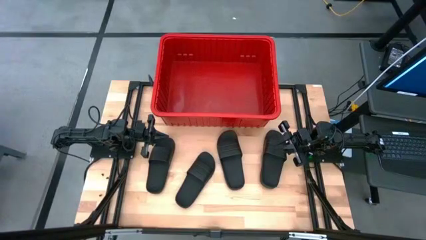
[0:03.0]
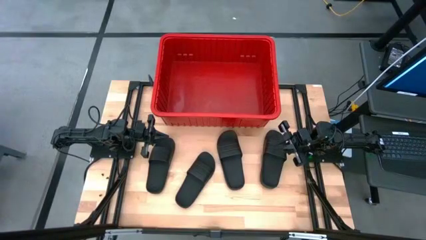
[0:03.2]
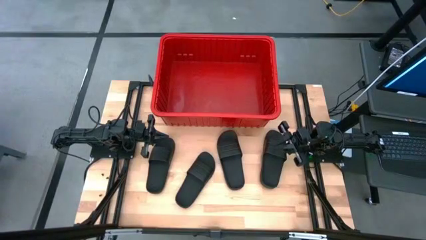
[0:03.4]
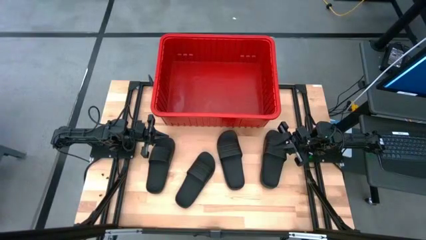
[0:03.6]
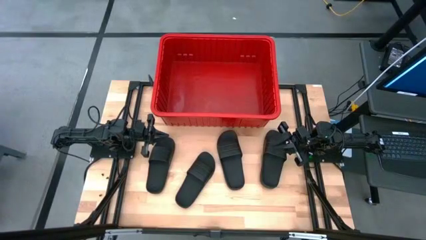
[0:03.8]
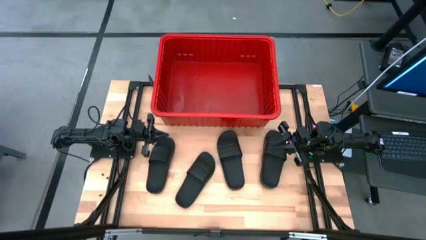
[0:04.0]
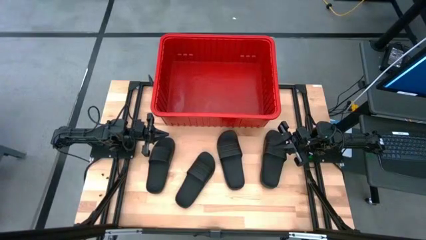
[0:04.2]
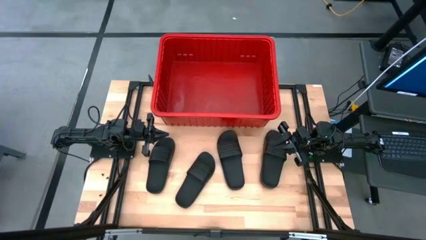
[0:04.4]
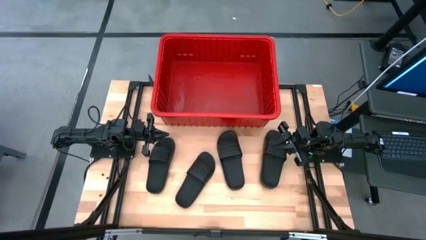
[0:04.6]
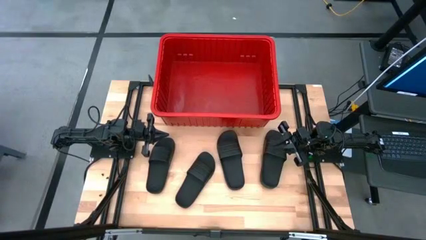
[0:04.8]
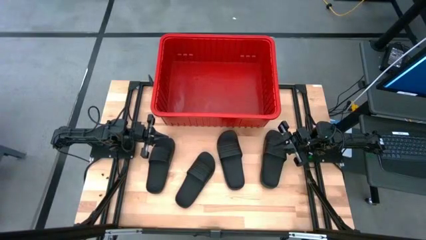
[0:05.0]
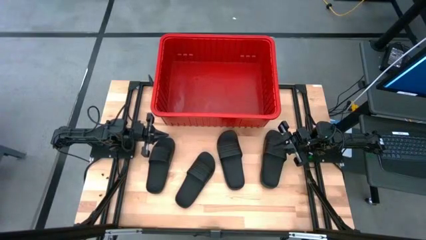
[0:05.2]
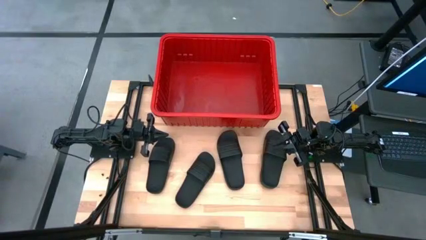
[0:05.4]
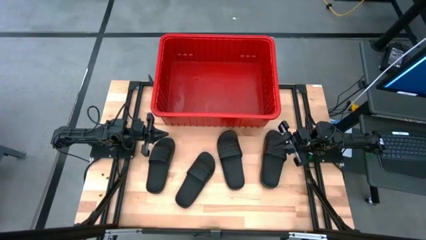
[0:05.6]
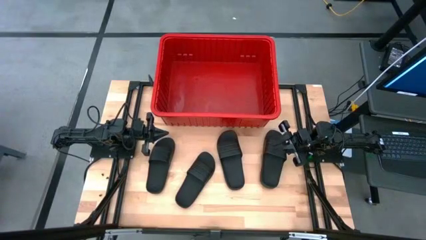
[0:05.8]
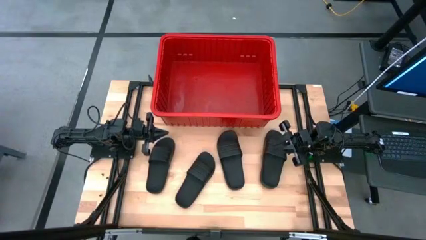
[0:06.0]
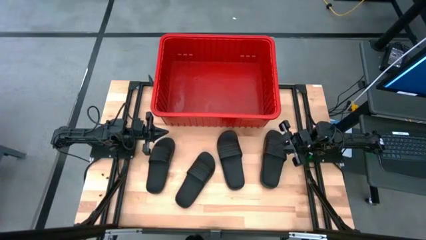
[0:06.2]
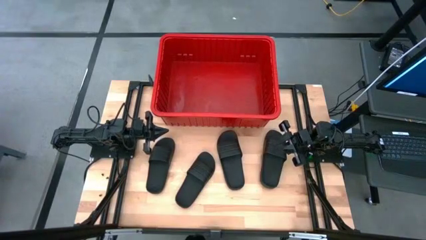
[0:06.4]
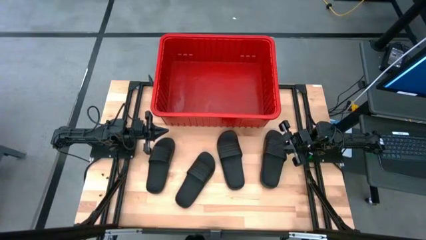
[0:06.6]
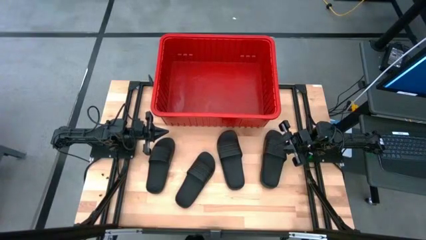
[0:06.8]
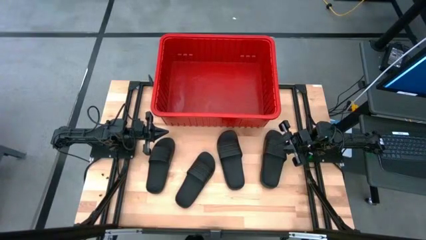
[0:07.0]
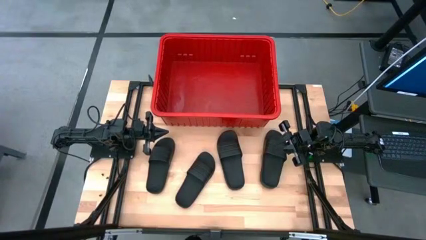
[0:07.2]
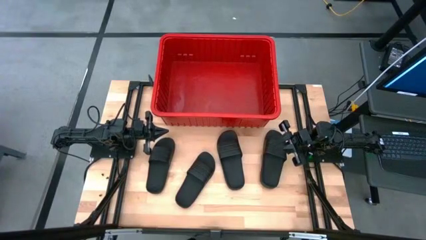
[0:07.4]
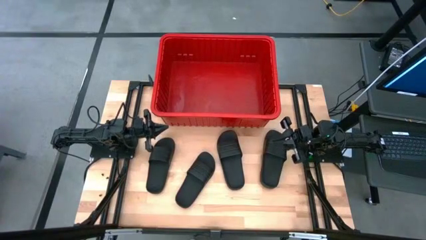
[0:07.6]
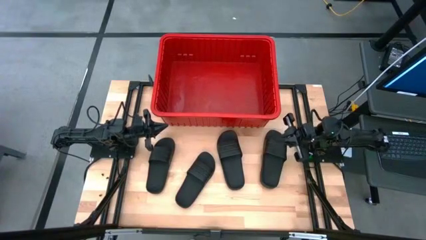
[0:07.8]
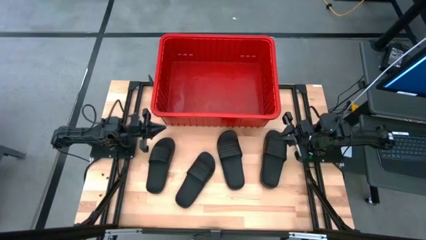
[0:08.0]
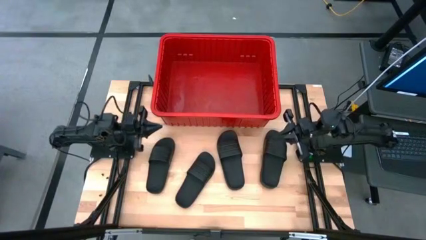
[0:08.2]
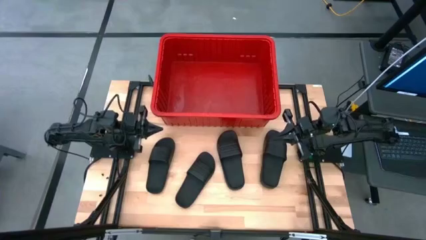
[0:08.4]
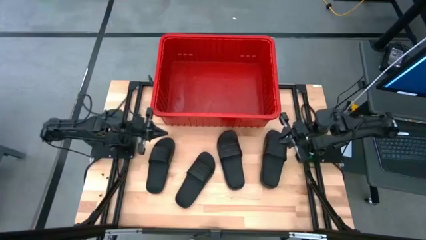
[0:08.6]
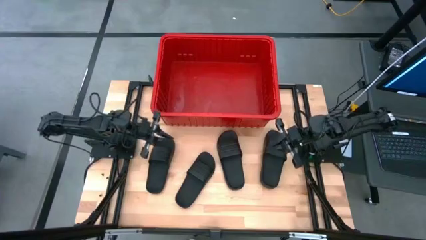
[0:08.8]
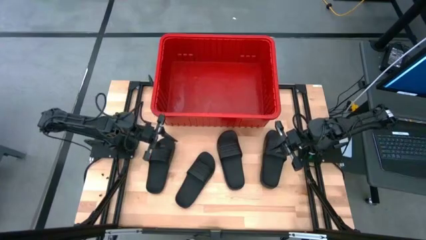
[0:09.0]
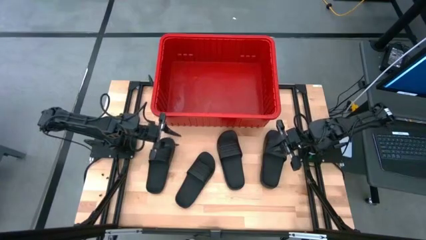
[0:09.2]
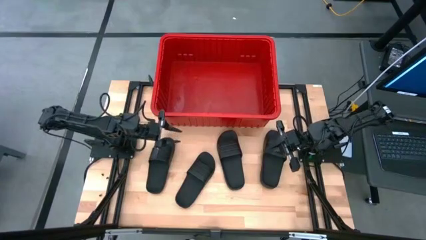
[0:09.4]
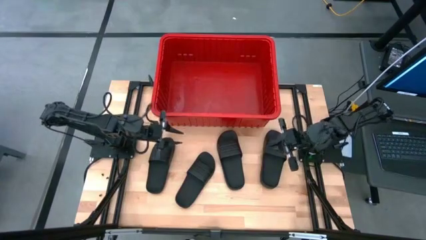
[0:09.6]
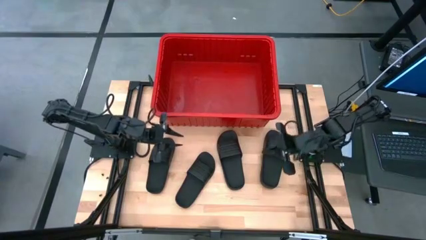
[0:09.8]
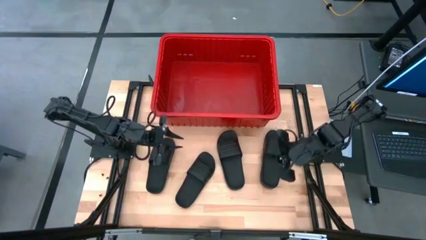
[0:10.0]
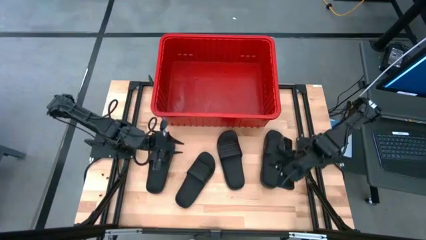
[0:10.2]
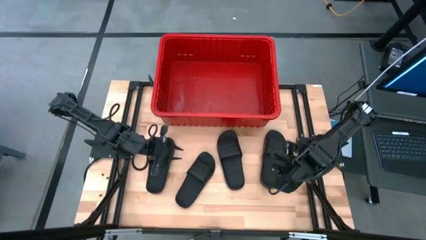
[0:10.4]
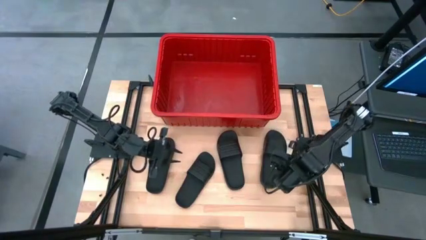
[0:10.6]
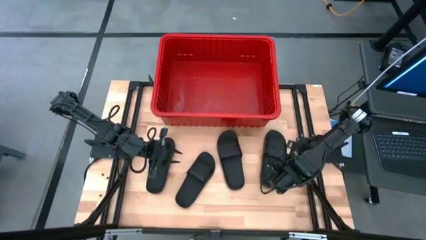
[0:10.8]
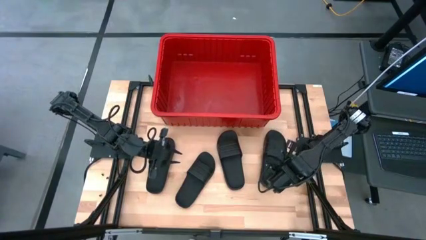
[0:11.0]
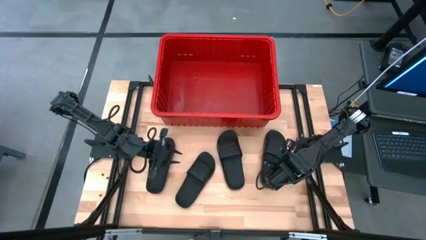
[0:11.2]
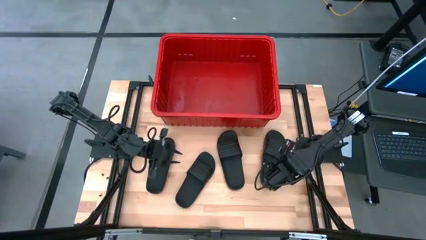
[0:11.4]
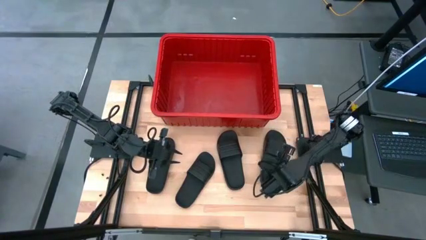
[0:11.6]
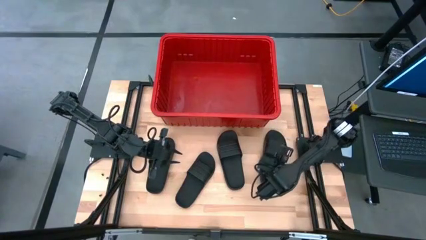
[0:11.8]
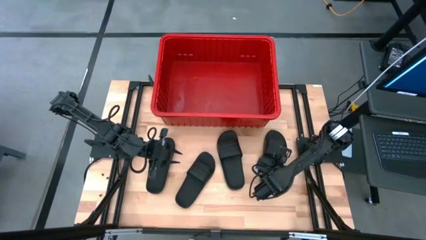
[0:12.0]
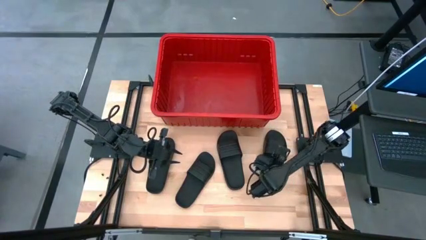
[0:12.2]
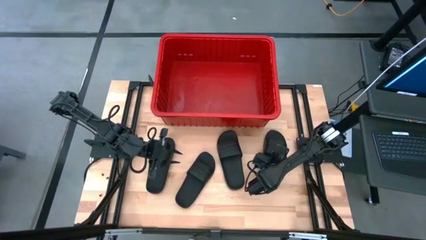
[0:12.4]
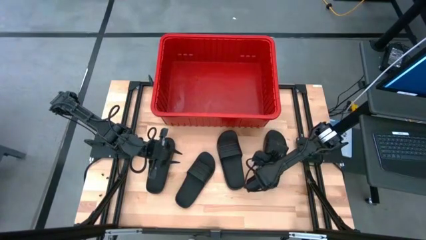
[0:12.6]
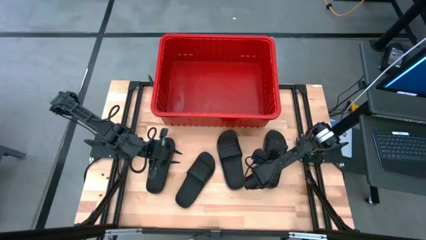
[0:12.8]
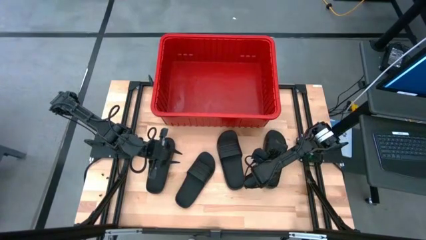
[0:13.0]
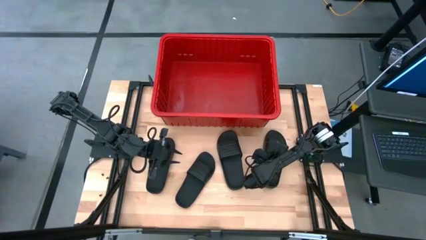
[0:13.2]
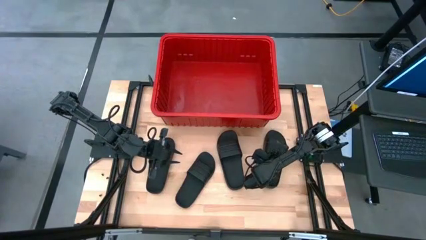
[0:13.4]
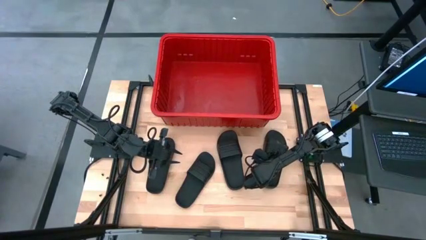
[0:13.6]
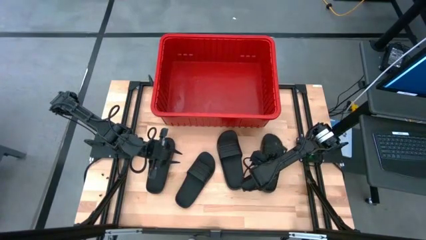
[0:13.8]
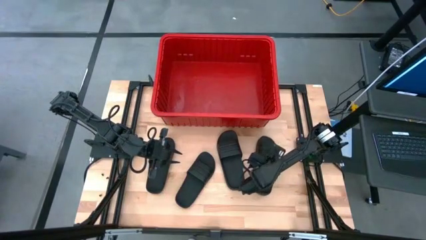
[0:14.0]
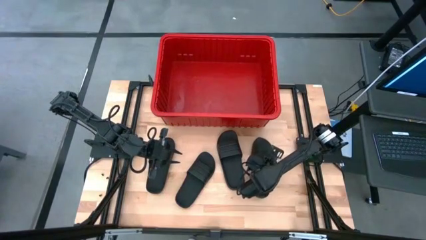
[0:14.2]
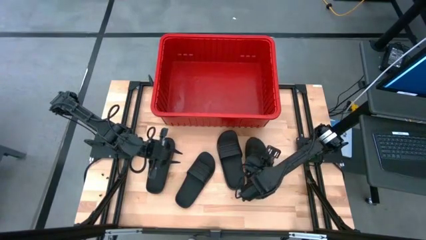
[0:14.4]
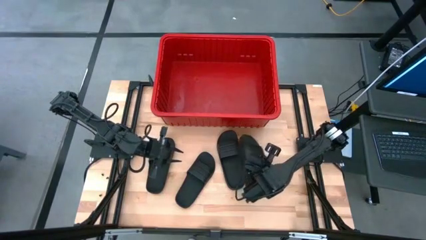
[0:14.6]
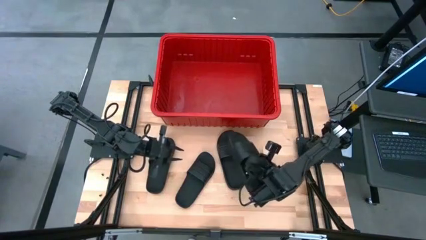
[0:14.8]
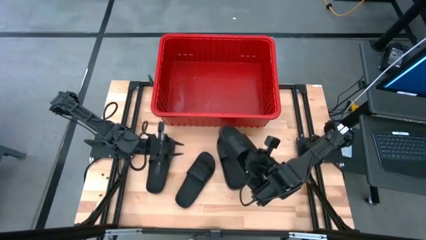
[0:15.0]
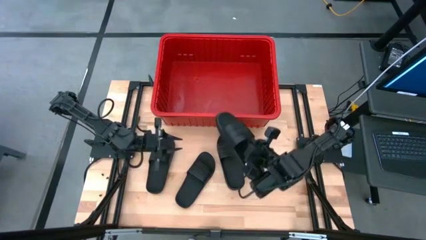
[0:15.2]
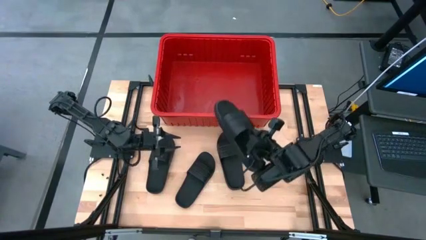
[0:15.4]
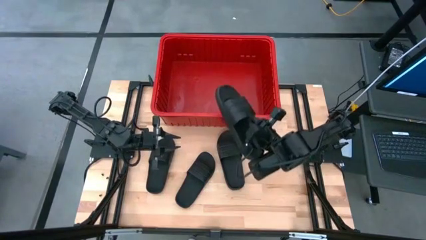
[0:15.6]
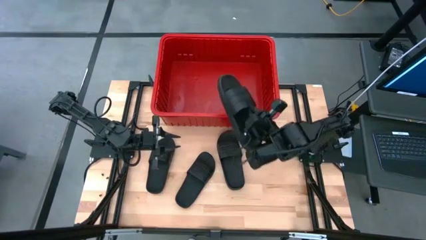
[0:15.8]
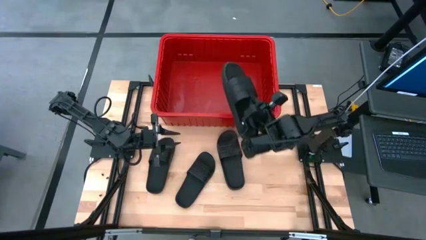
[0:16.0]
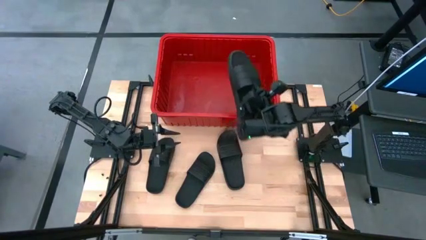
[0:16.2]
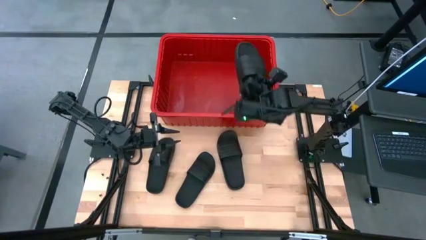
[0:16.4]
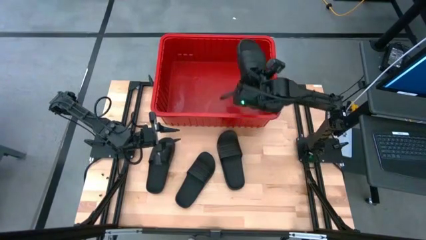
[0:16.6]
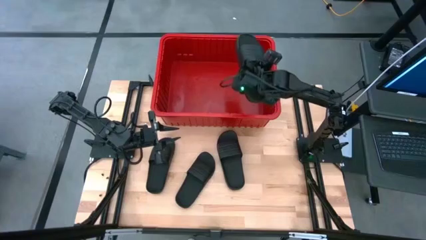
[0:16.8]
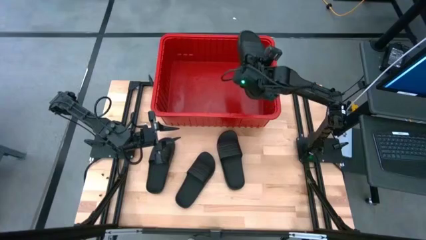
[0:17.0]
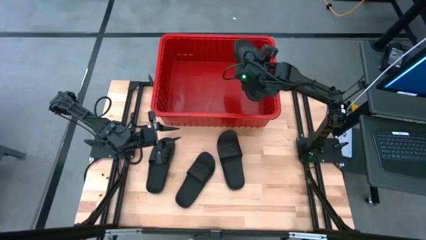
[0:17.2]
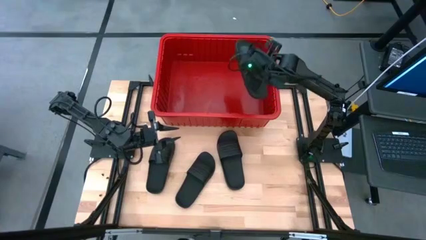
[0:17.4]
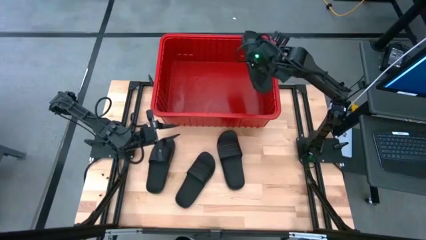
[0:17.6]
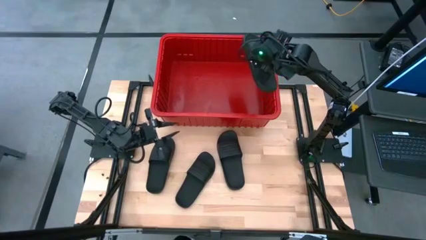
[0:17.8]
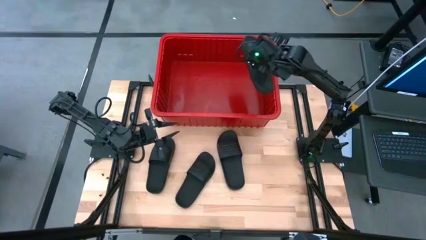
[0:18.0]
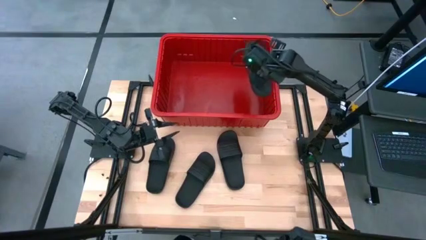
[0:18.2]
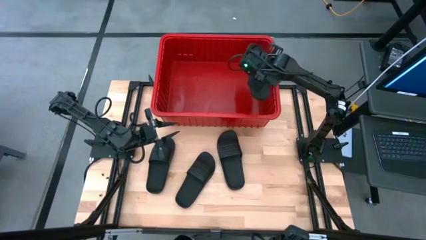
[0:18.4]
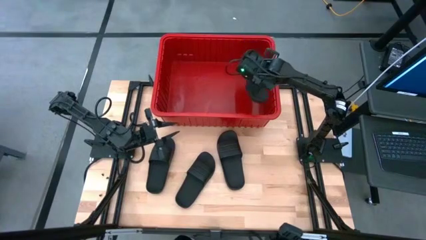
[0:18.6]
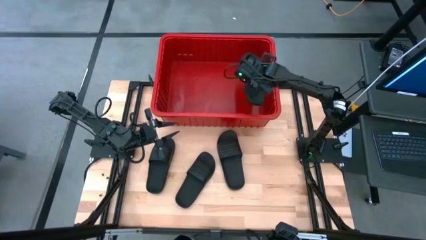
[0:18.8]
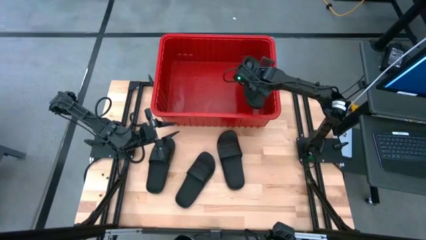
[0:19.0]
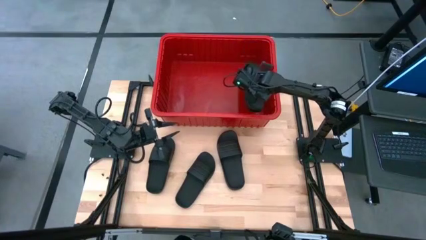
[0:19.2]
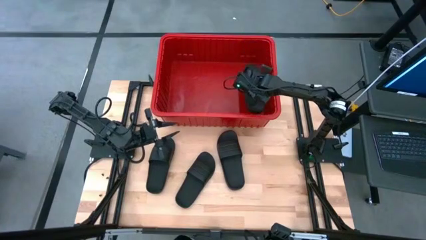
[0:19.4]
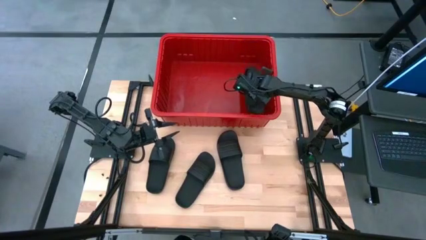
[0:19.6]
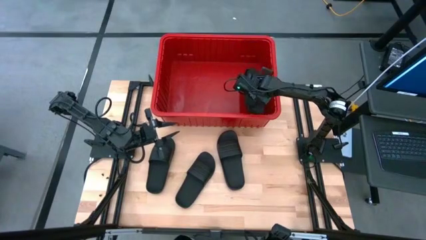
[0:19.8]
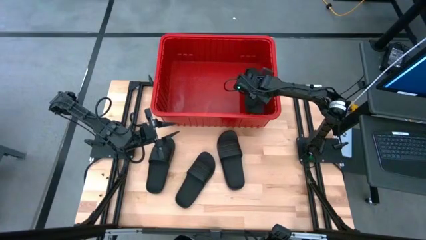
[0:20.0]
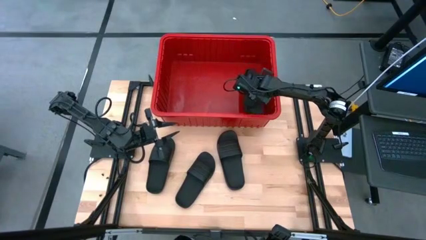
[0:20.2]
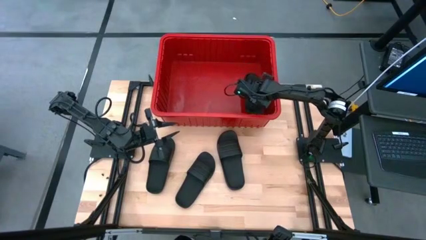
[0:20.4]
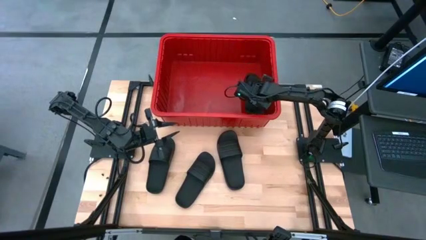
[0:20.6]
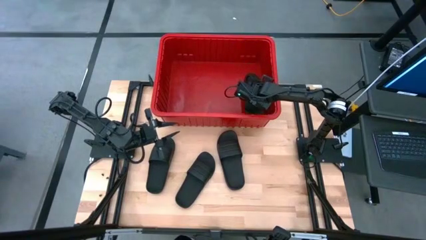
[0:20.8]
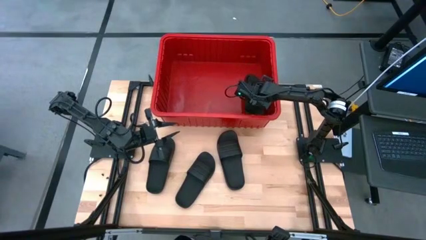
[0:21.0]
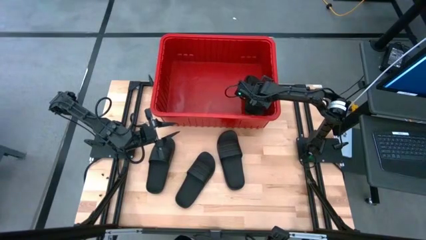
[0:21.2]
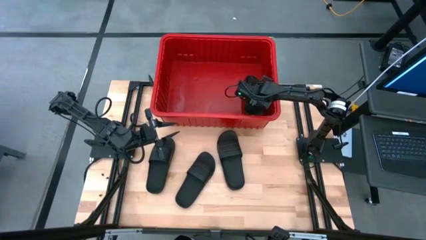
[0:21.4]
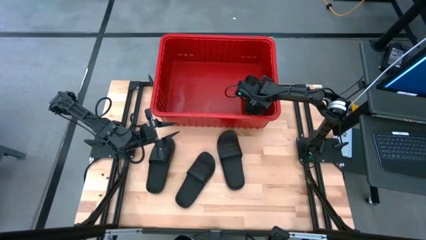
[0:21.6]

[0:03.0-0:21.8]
Task: Pick and place slides into bin
Put the black slide into the bin
